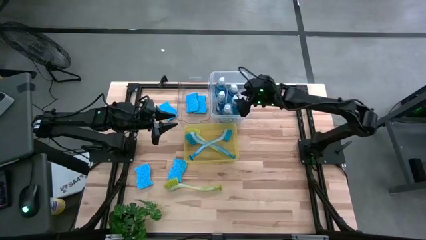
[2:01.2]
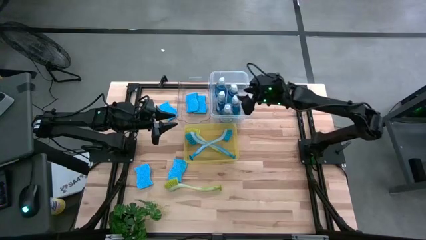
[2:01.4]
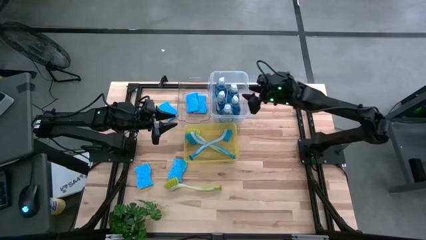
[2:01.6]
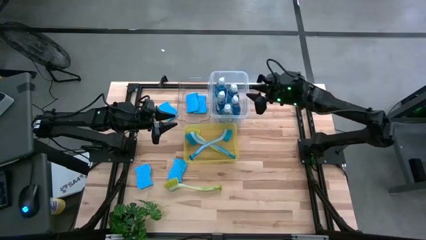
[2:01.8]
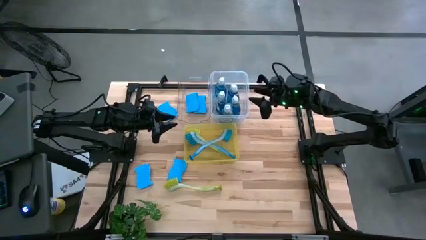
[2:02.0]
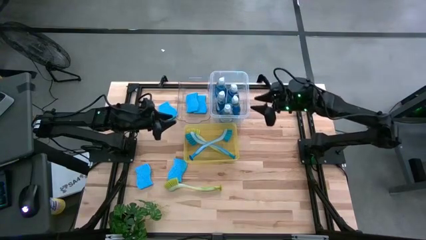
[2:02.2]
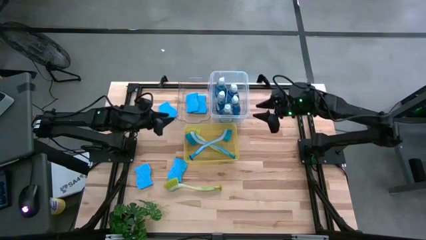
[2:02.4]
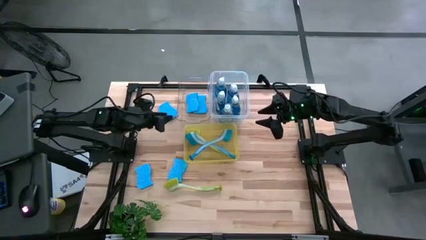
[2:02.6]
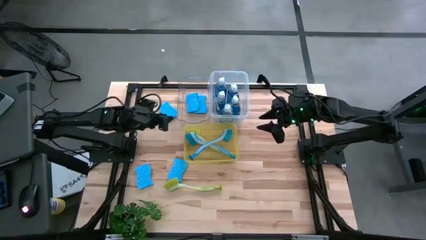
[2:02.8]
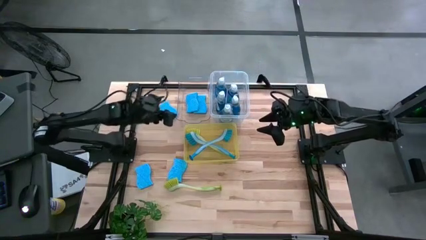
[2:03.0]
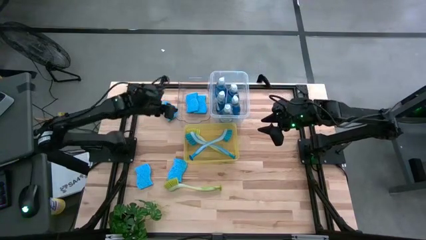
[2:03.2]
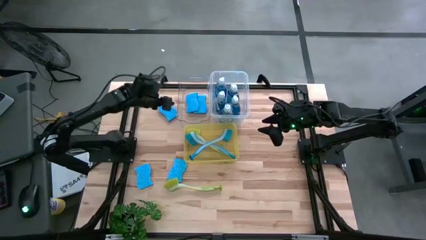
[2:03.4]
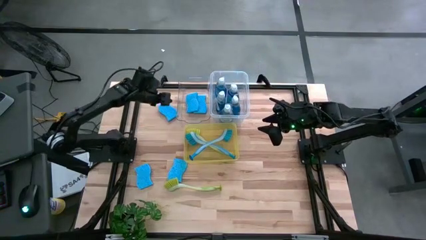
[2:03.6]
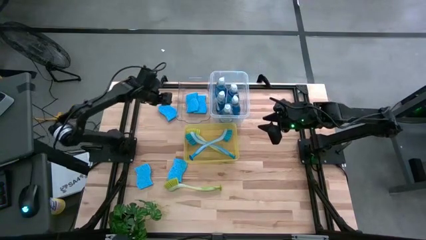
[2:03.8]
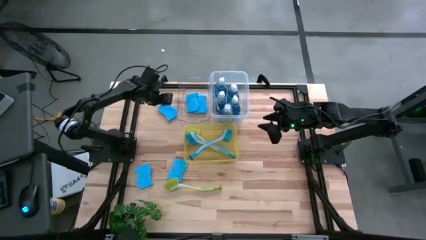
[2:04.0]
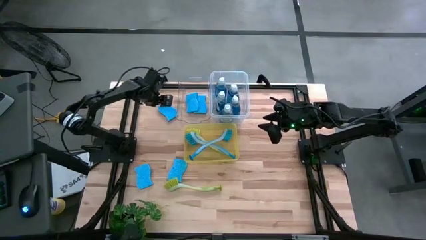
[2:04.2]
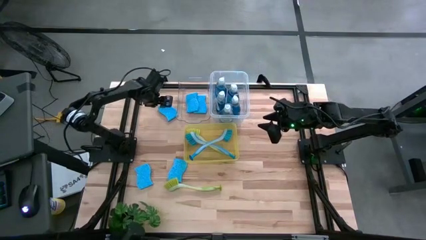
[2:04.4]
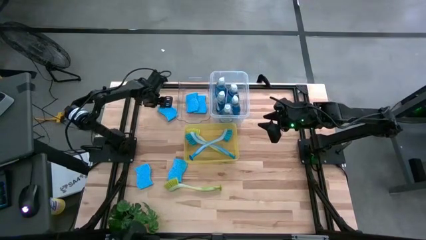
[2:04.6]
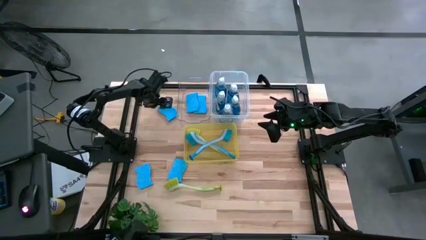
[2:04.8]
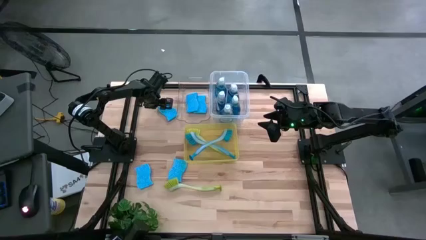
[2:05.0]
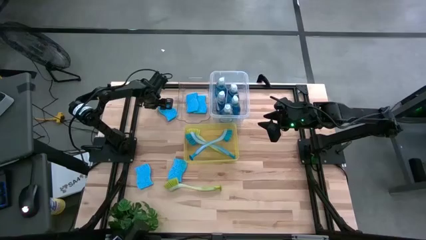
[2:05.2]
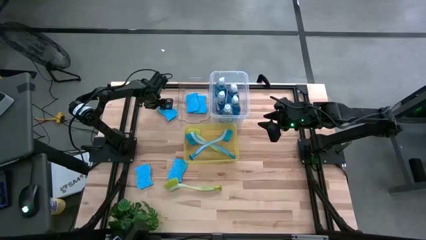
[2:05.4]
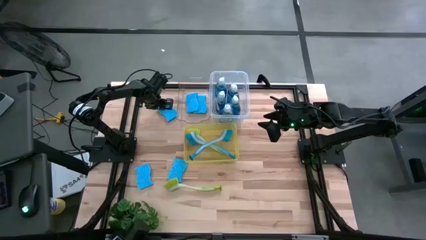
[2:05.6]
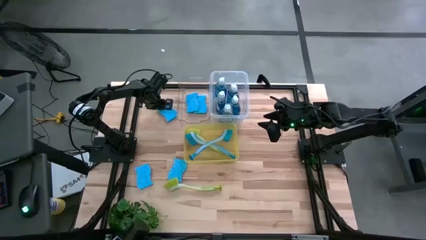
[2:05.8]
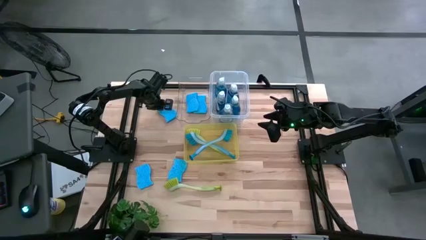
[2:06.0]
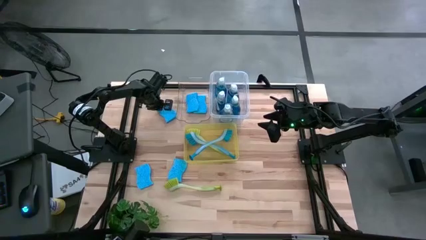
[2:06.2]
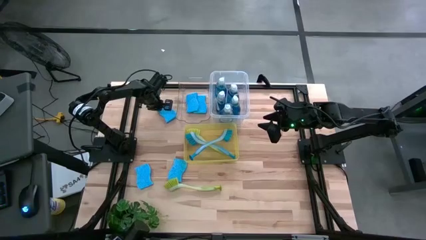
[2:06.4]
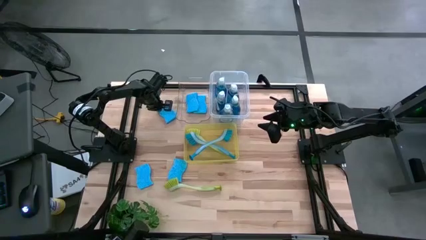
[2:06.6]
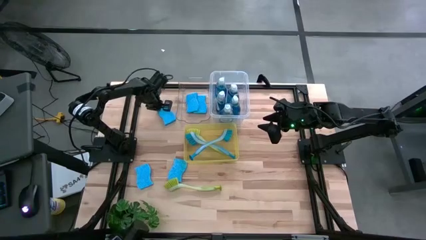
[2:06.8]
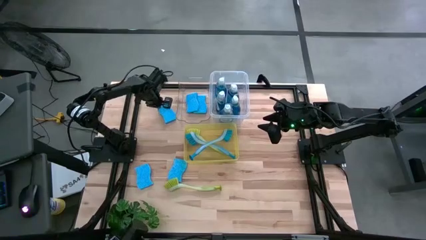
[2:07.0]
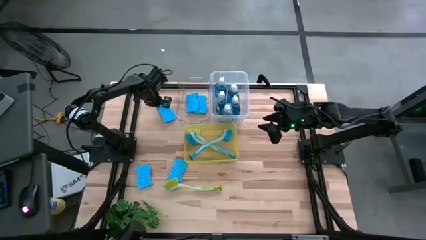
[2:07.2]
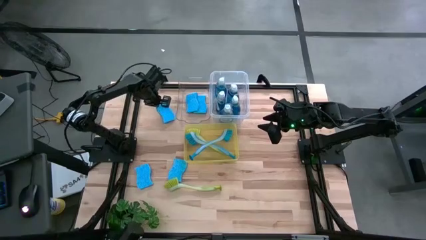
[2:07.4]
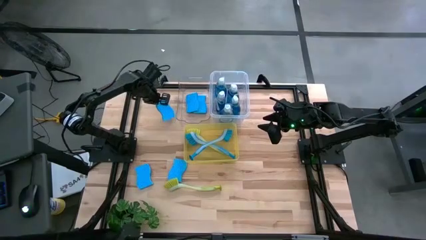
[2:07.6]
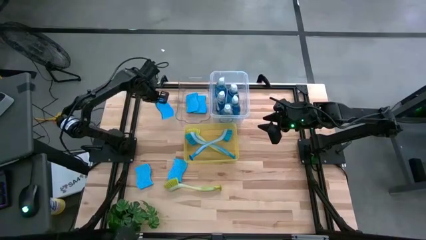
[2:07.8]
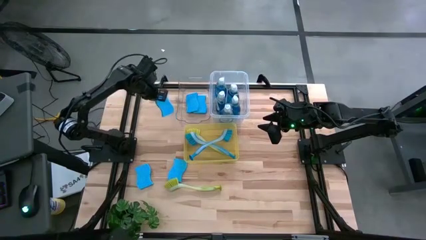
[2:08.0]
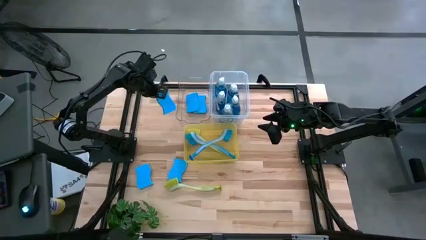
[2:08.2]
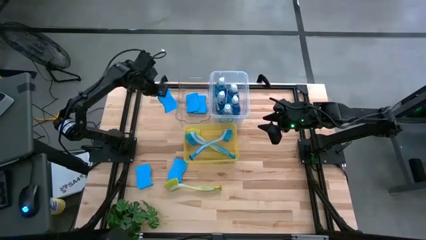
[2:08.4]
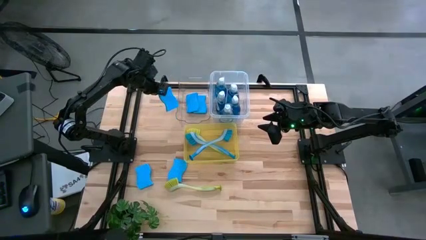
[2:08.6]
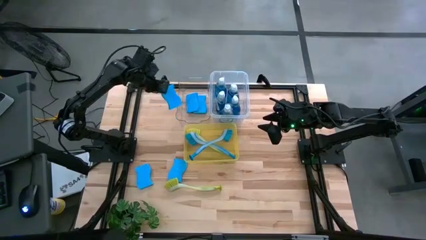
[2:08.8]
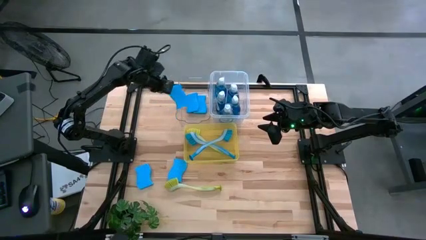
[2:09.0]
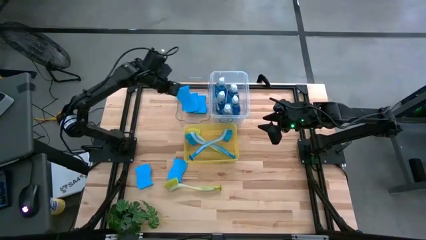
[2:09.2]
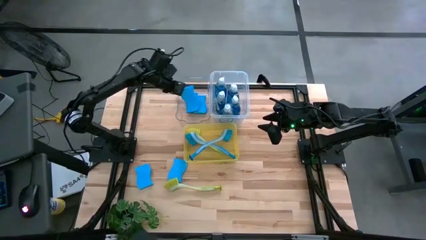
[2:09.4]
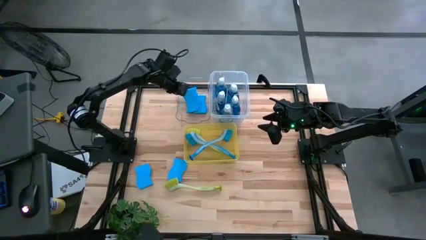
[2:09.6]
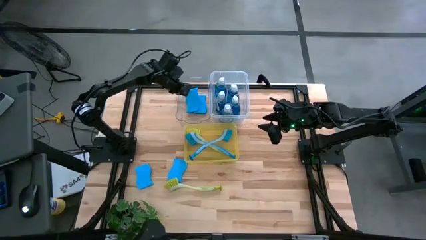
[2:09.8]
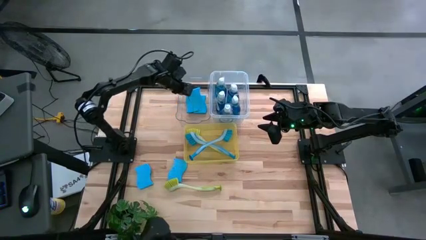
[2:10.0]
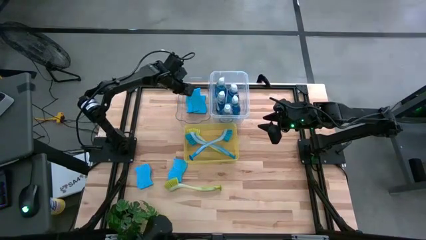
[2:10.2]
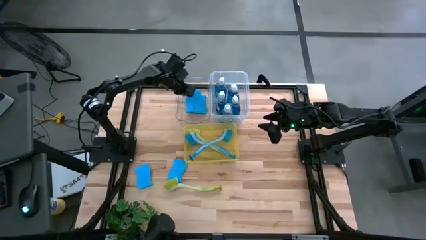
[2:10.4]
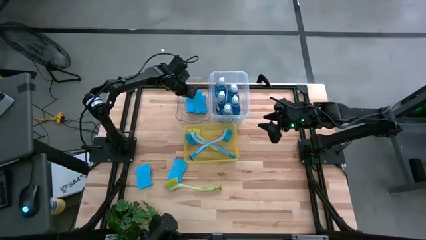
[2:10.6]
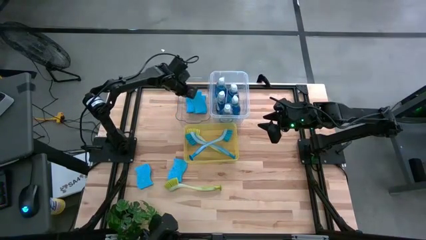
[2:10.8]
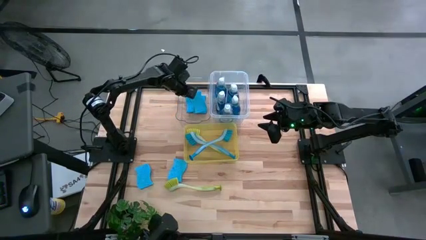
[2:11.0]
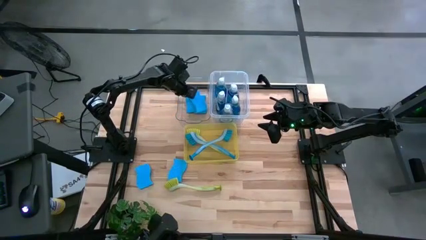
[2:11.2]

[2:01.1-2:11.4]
Task: Pick & Place Kitchen Sink Supplies
Put the blue sponge into the transparent bin
